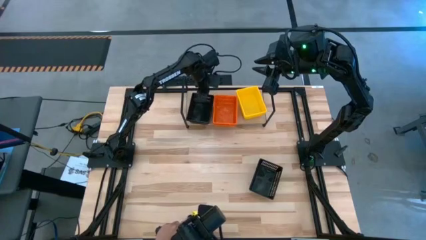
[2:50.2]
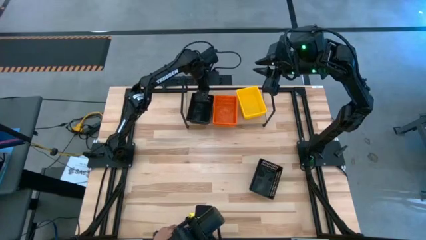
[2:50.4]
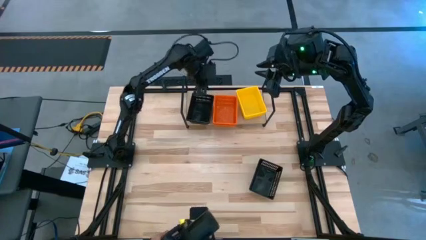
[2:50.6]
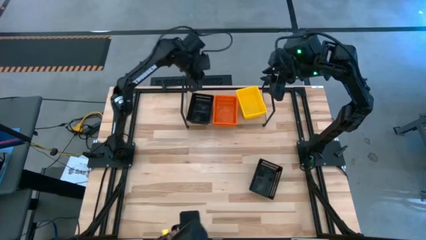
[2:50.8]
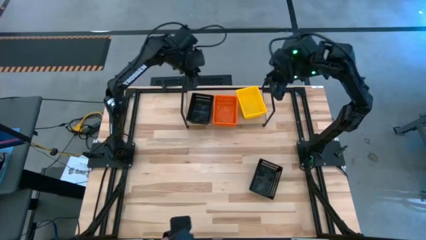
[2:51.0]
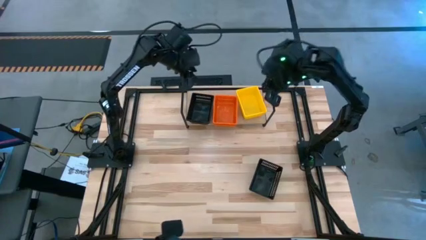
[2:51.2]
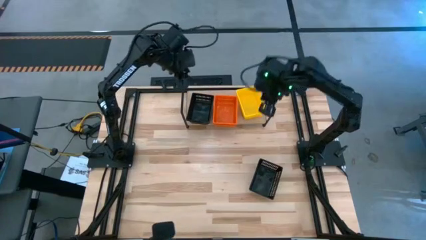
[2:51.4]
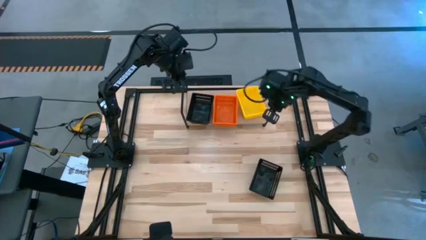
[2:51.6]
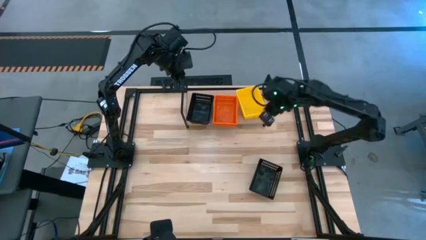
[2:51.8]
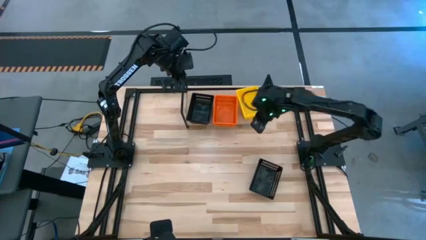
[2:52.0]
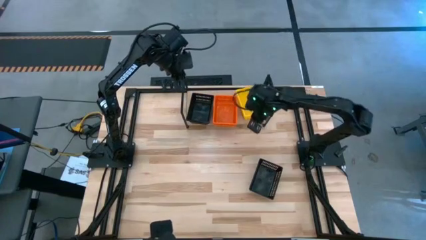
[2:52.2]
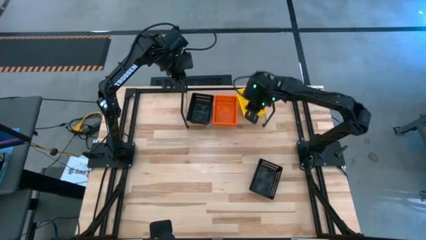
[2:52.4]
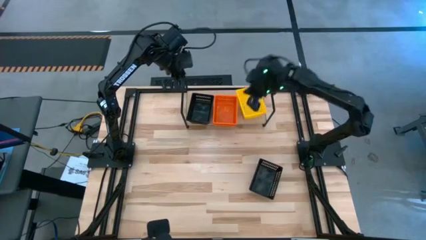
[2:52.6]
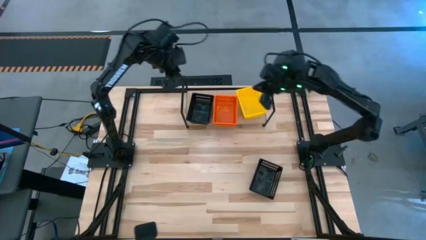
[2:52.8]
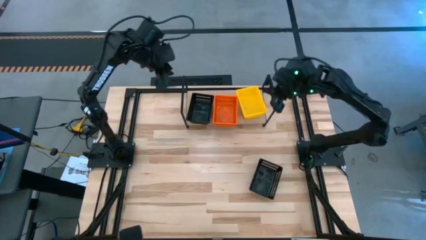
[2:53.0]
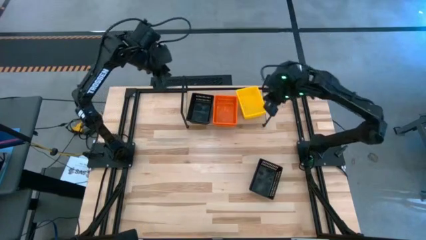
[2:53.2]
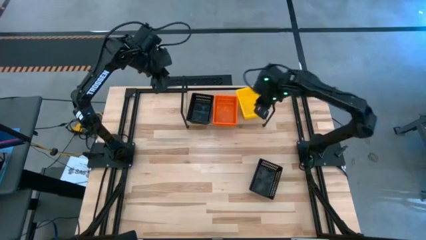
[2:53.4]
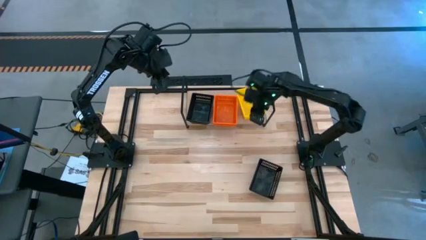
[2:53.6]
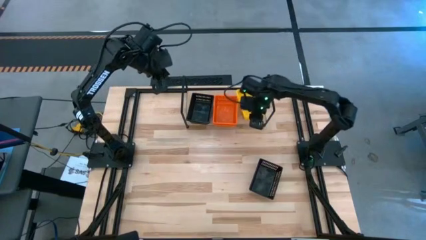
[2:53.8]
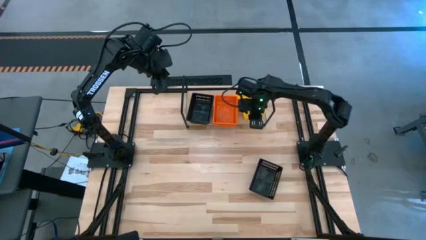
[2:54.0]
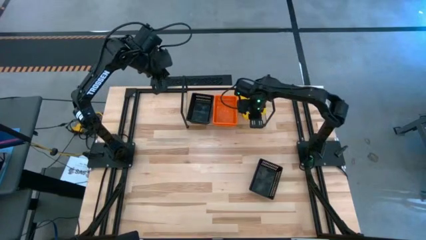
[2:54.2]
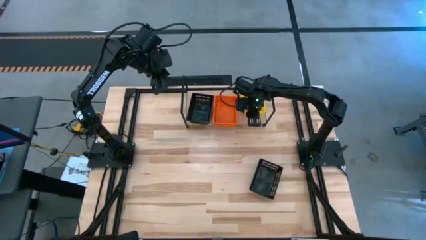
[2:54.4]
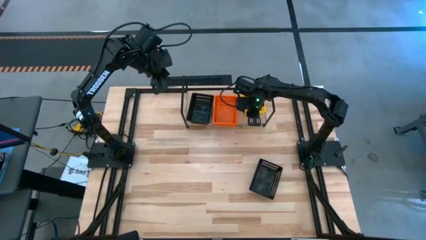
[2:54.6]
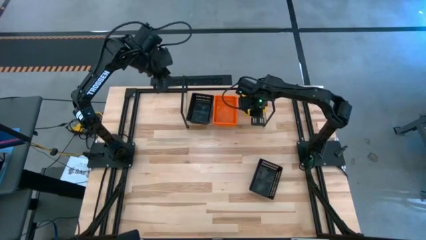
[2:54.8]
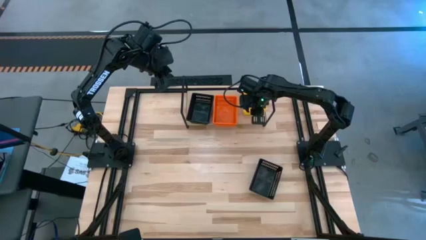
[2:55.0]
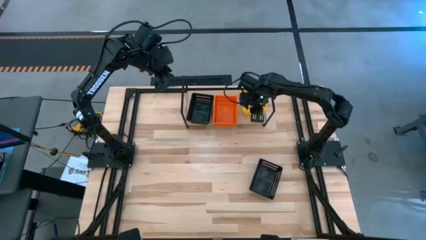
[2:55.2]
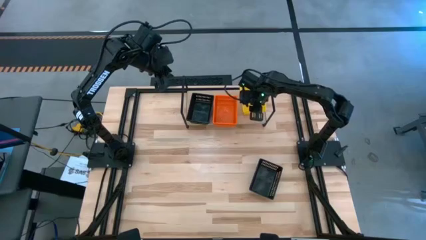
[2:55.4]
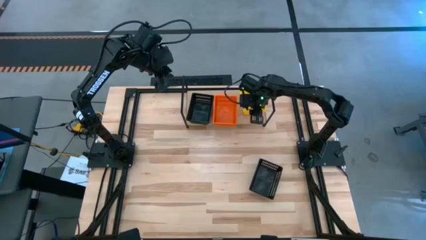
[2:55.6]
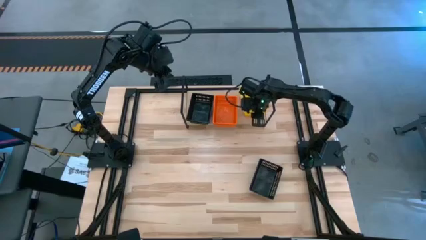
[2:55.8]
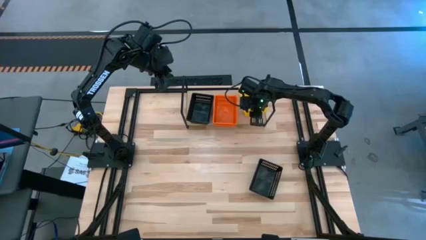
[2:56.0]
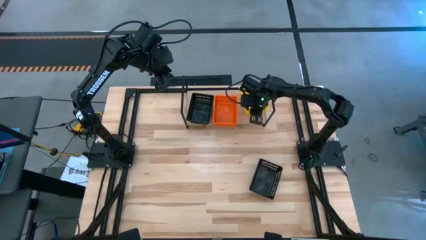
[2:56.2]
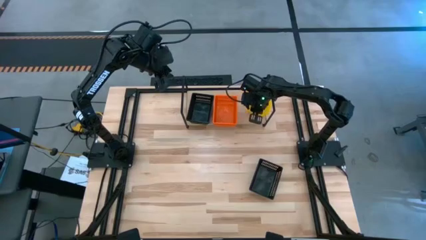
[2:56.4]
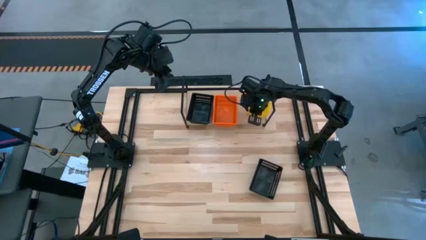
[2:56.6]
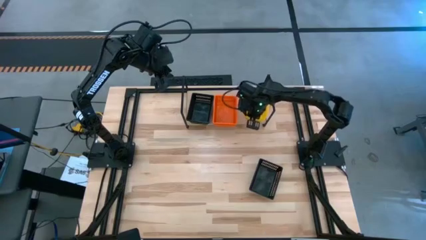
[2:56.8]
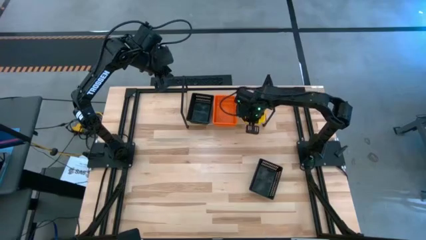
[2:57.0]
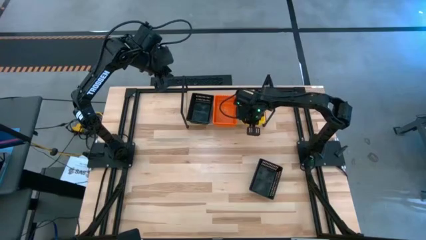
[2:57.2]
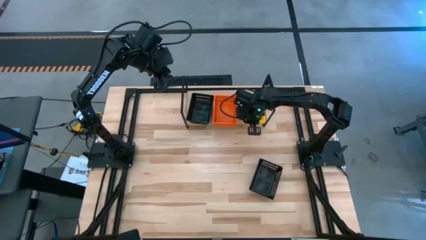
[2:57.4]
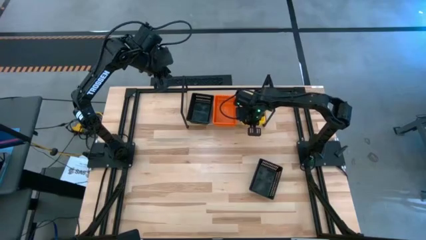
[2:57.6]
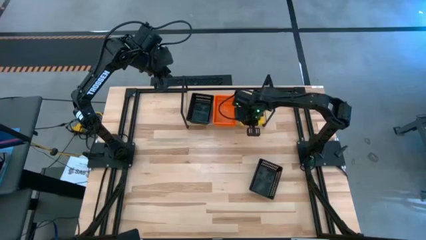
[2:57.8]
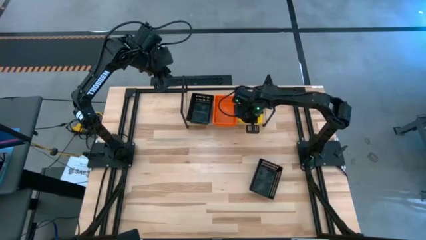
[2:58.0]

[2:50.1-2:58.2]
Task: Stack baskets on shelf by color
Adjust the stacked yellow bins

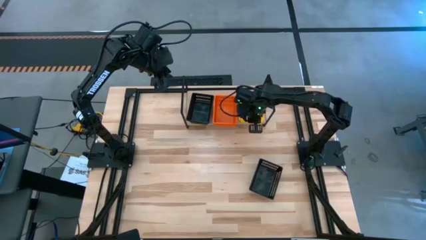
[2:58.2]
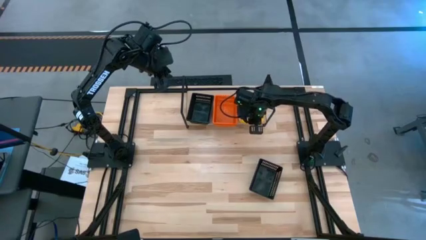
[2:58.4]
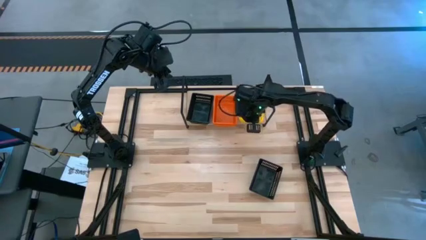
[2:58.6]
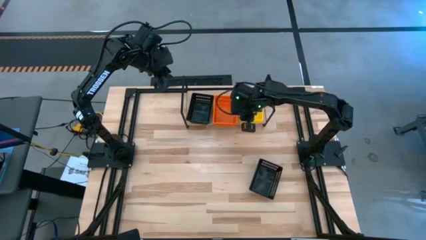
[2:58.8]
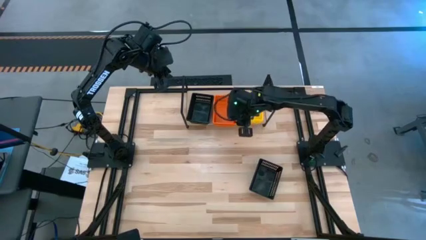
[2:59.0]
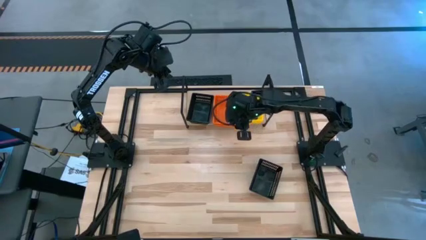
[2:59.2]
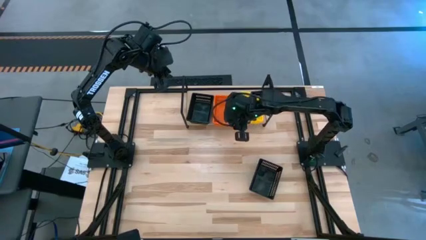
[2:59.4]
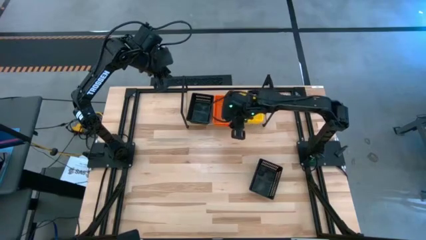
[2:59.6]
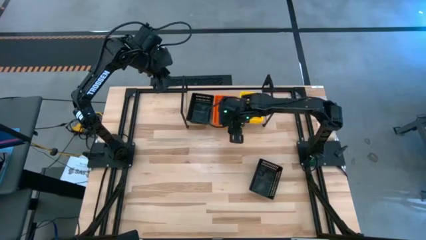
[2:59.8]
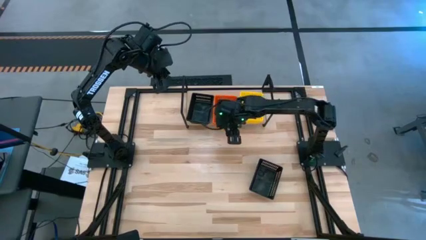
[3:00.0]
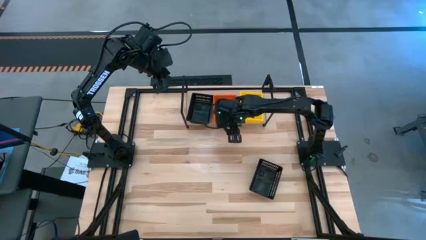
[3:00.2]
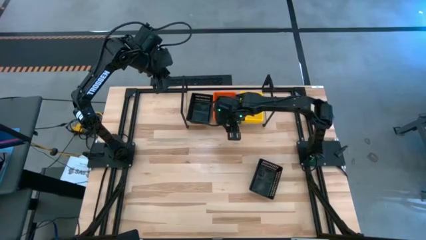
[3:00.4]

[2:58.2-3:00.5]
Adjust the stacked orange bins
